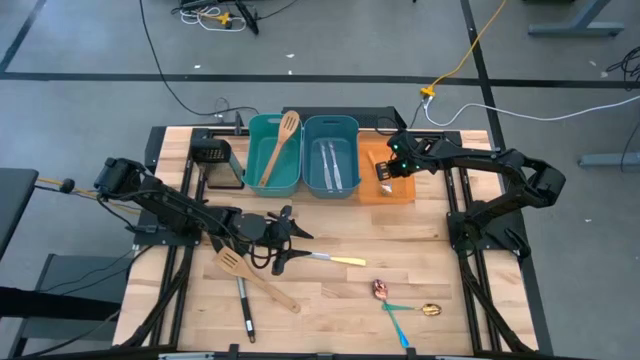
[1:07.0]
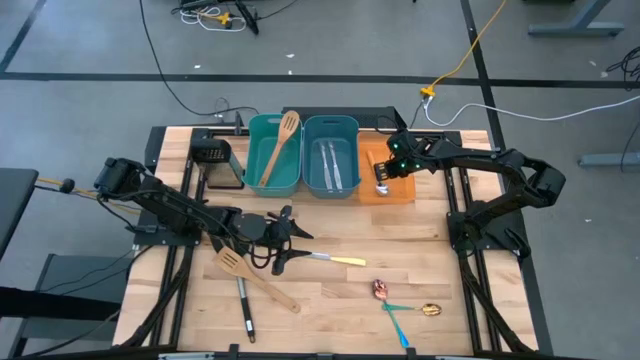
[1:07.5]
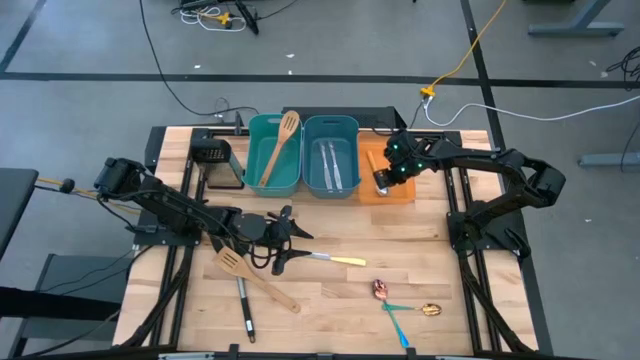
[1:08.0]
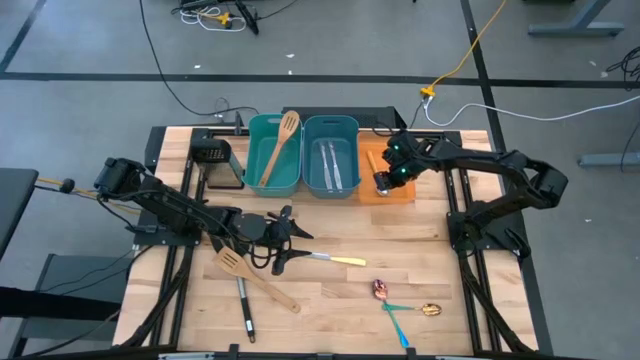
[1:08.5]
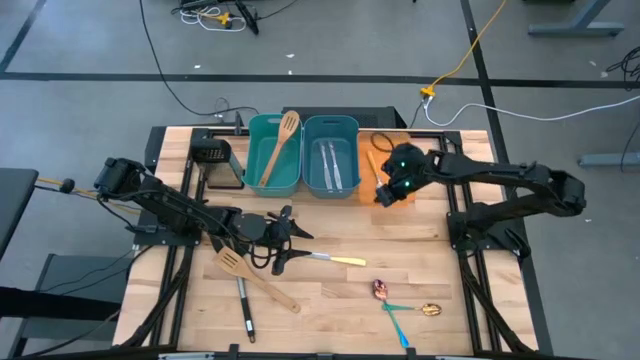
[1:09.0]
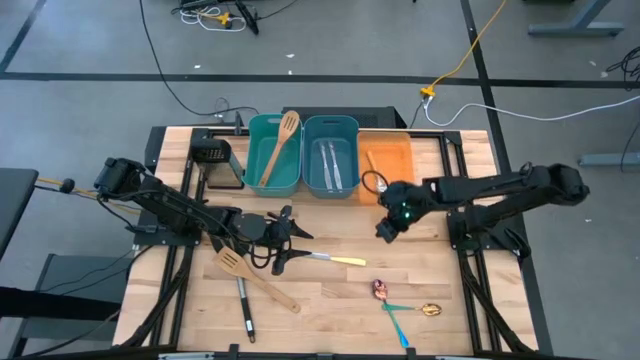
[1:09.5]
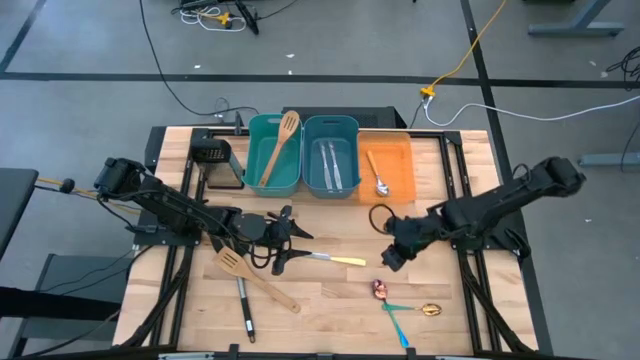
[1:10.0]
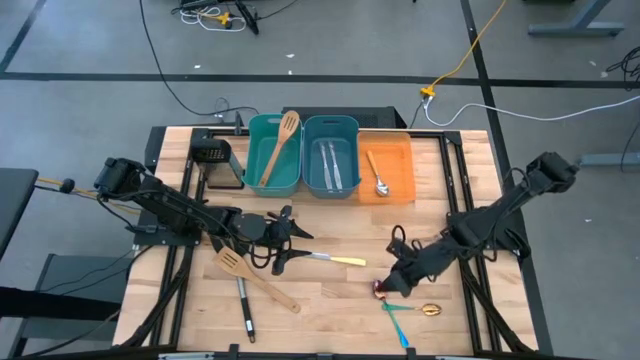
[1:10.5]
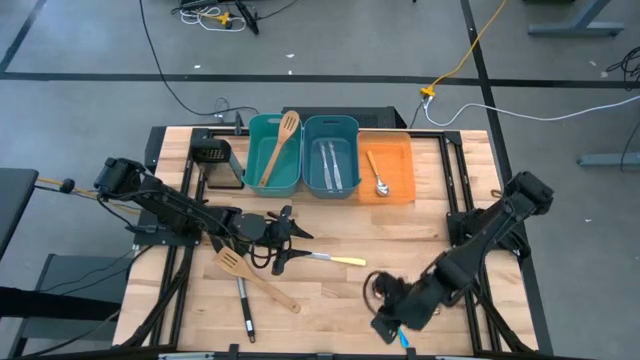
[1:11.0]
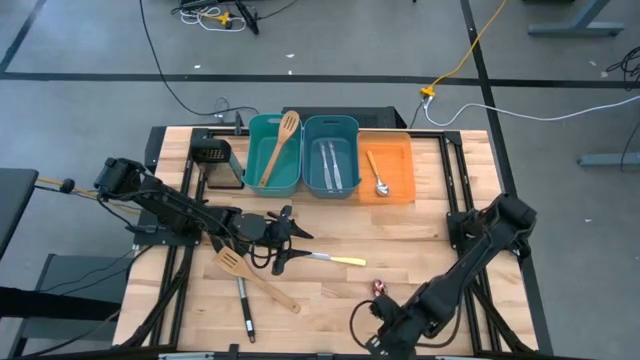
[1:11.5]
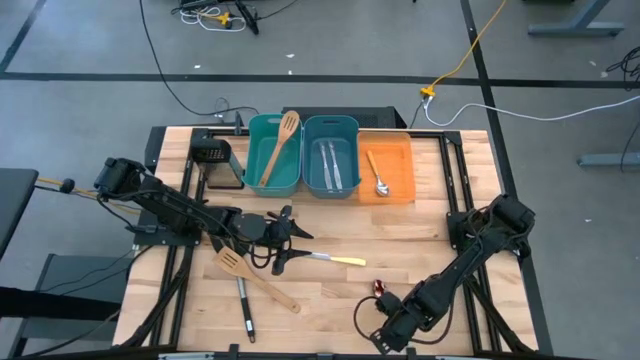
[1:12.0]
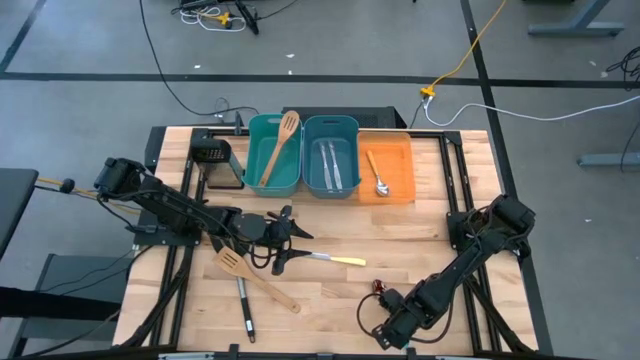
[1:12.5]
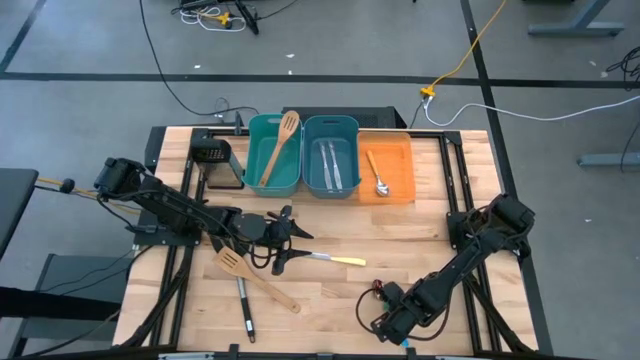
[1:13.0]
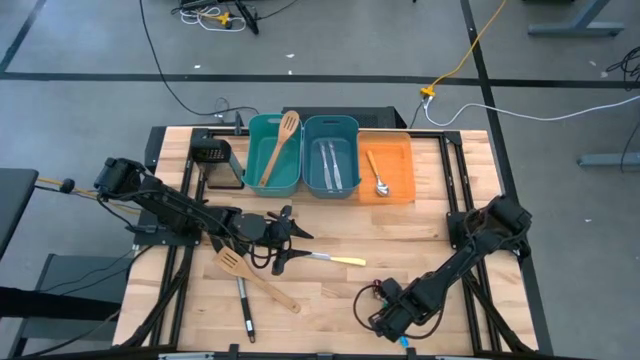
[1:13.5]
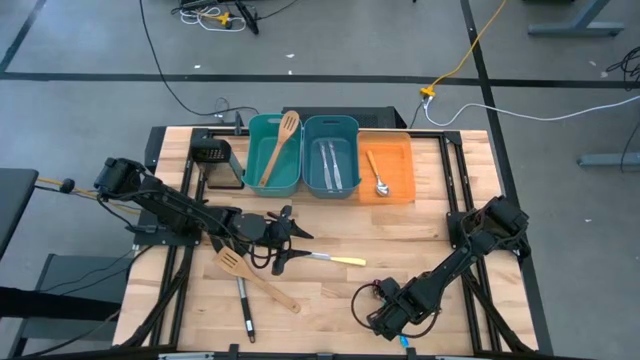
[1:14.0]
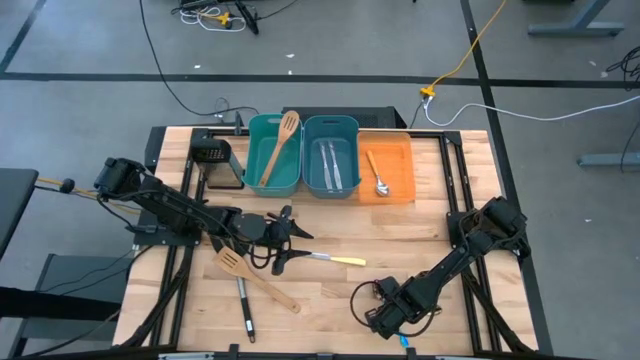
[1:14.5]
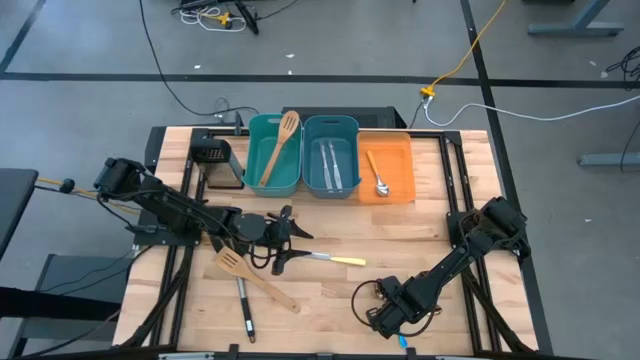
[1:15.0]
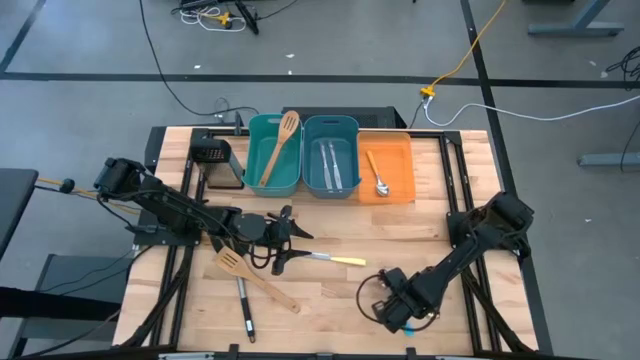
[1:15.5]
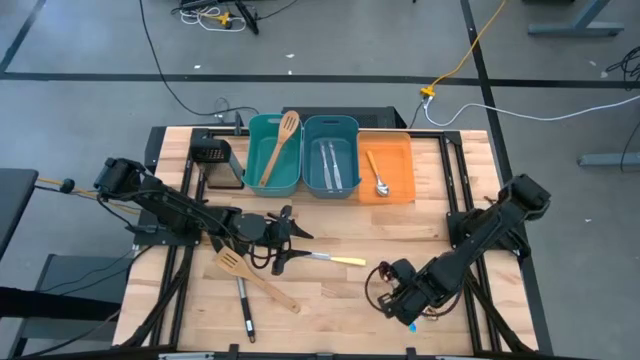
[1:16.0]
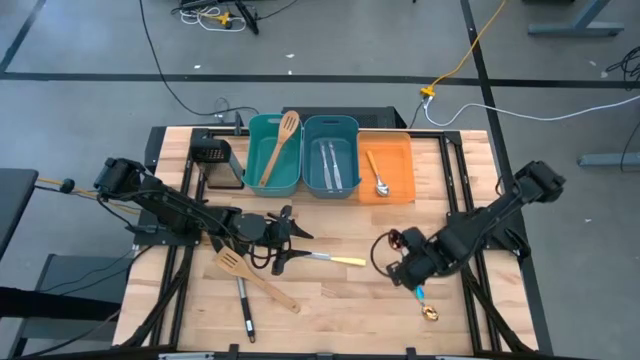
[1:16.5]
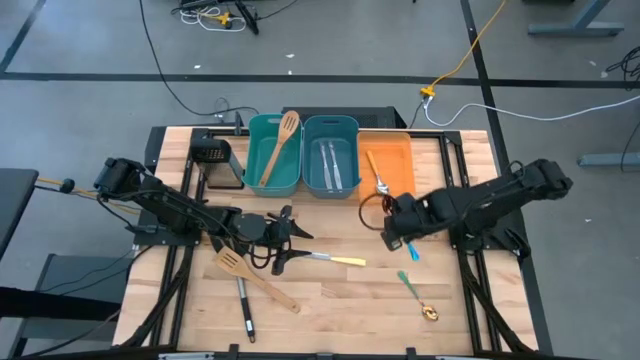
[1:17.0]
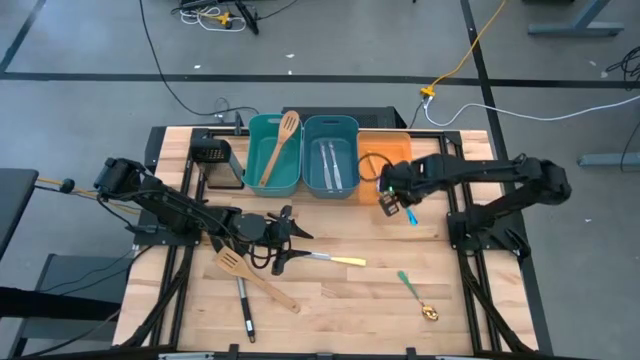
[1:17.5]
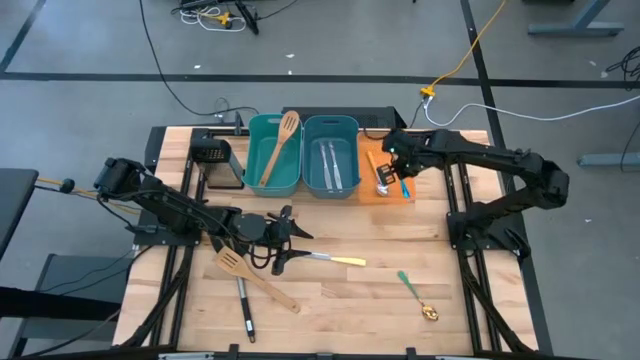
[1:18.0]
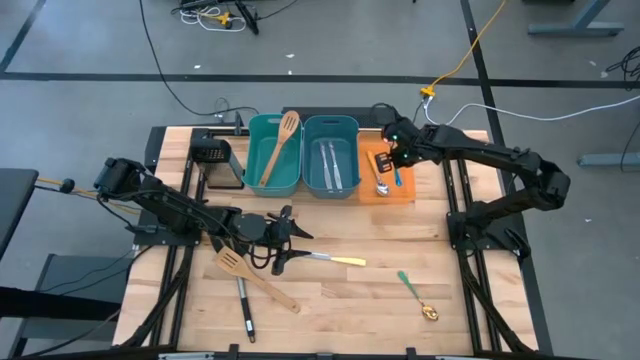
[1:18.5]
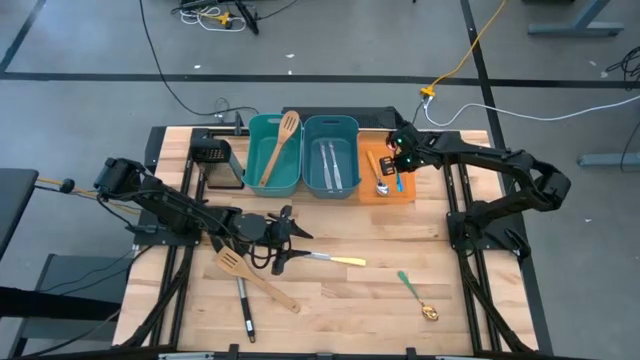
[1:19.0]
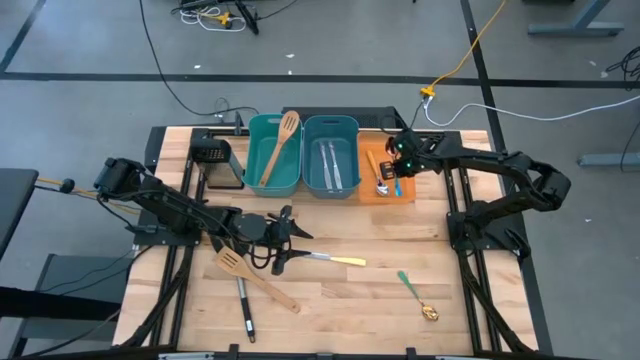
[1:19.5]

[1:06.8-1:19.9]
Task: Pick & Place Kitchen Items
Put the blue spoon into the orange bin

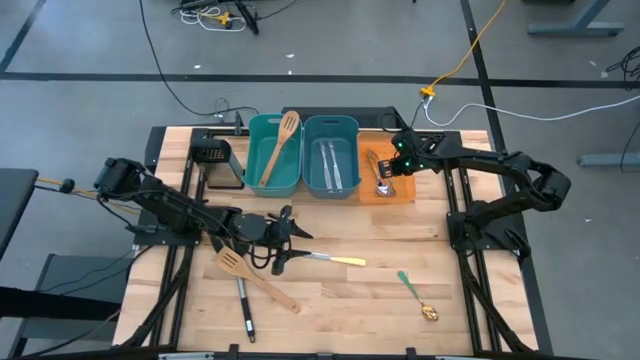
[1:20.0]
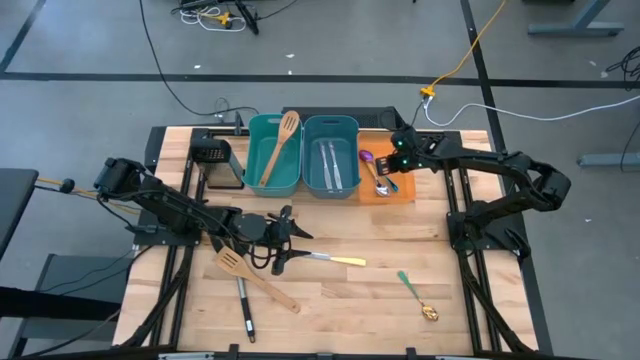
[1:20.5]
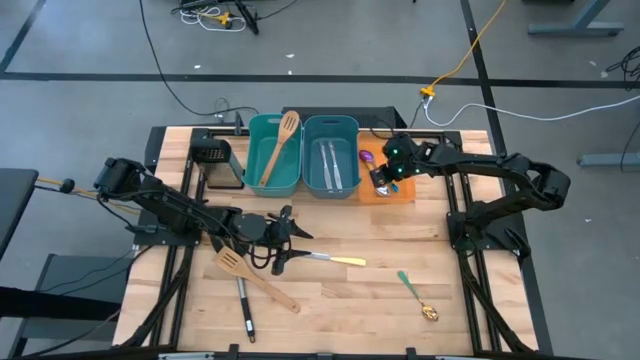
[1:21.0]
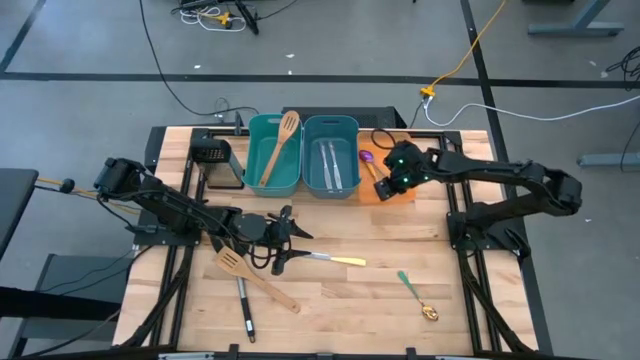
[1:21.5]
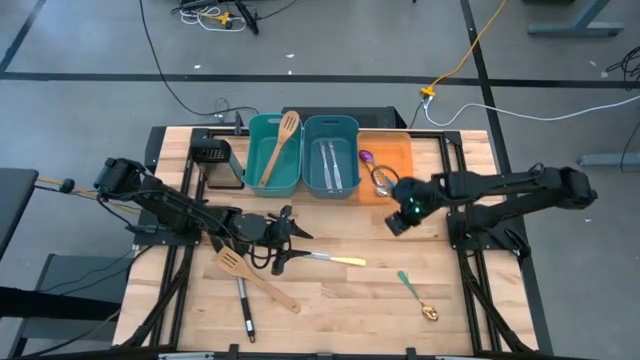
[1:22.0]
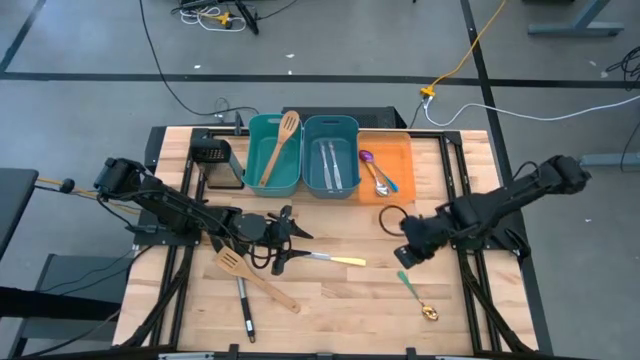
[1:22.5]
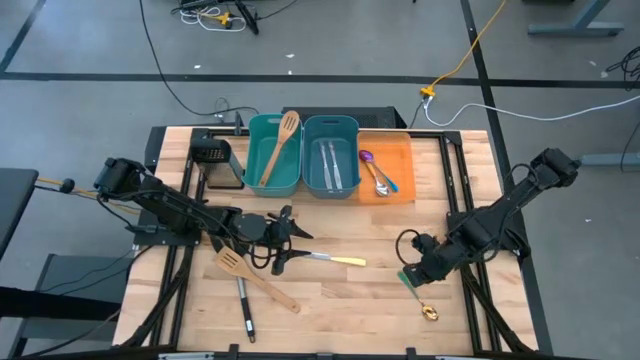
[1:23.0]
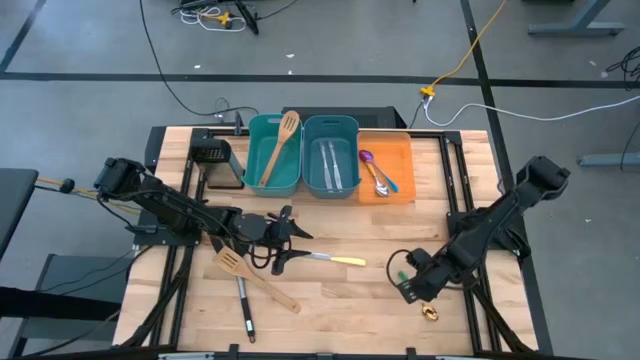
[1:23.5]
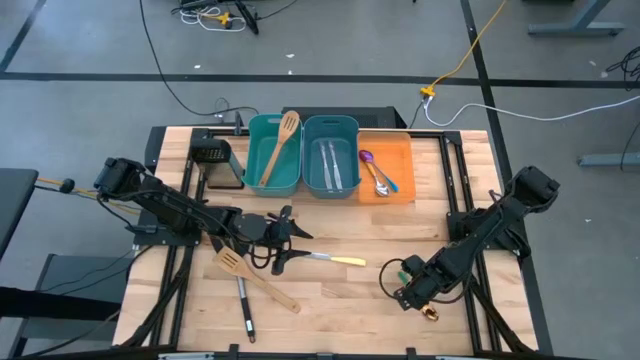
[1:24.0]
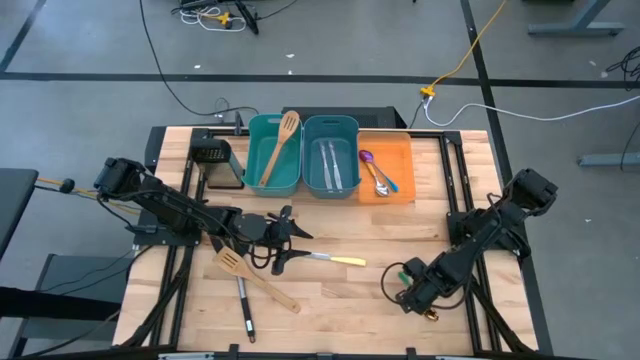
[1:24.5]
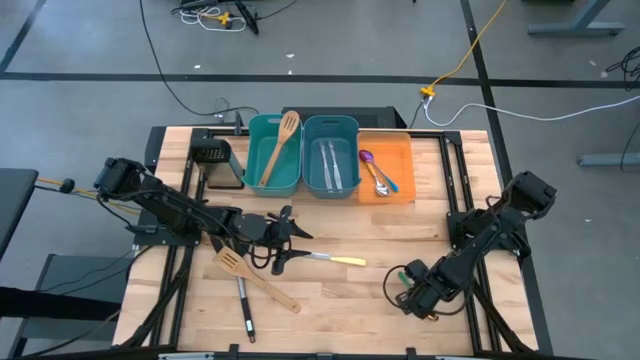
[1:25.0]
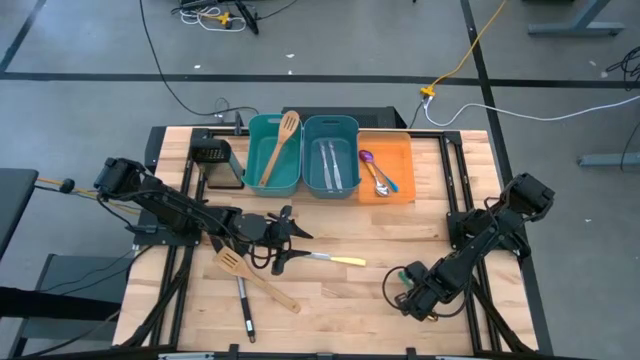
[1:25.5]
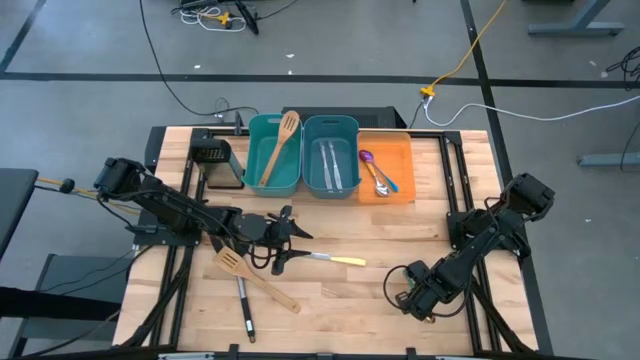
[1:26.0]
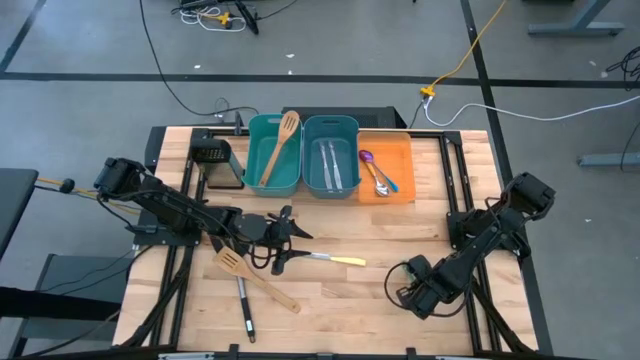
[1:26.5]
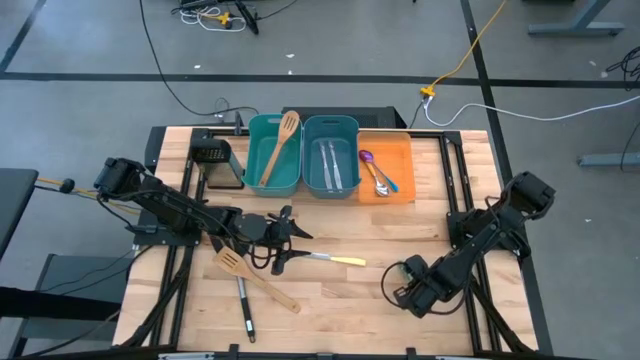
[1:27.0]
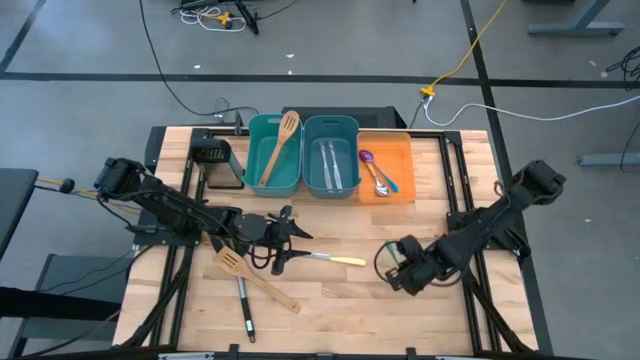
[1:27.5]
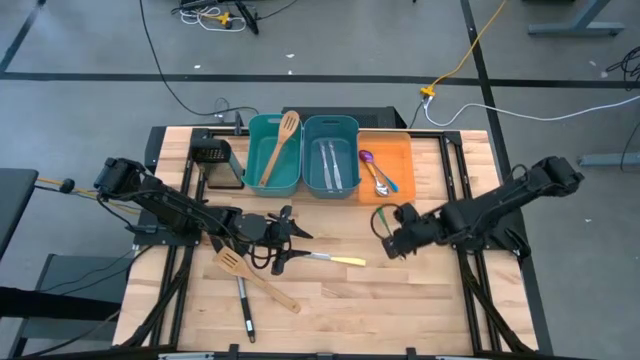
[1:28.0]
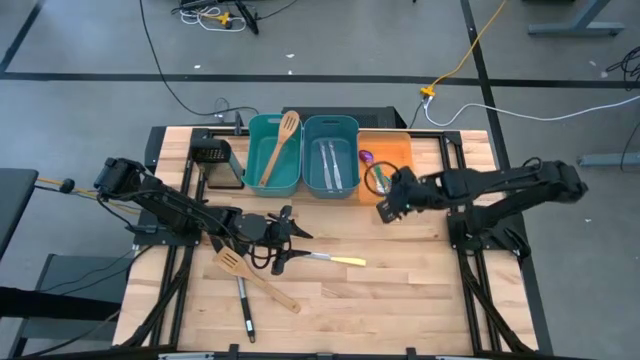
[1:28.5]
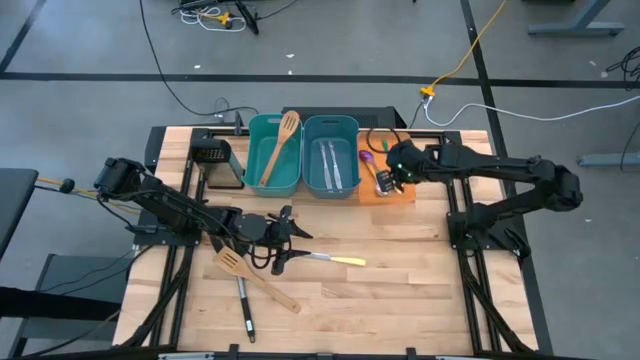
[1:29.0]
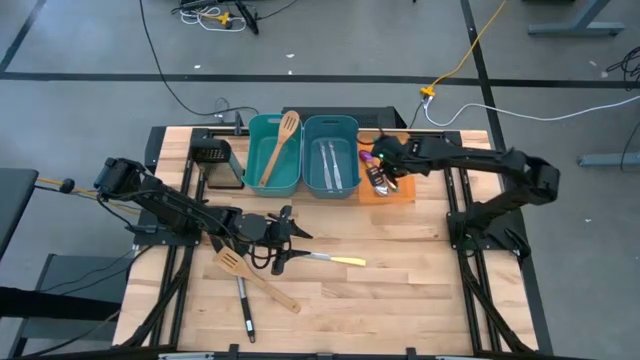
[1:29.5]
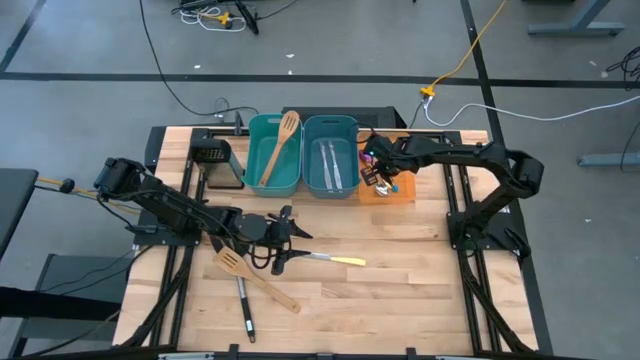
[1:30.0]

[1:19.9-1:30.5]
Put the green spoon into the orange bin
